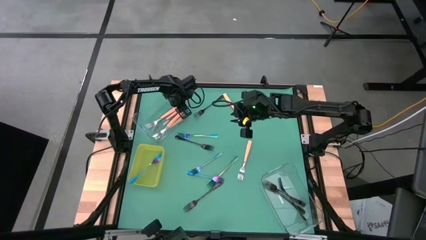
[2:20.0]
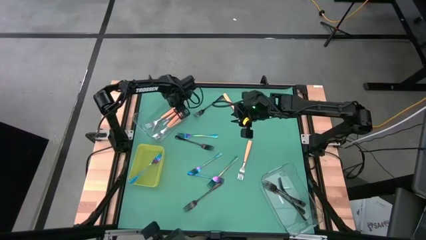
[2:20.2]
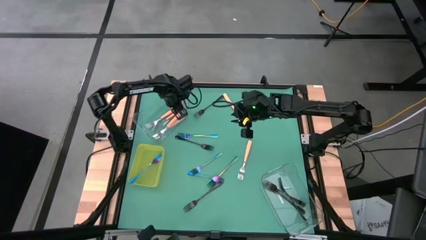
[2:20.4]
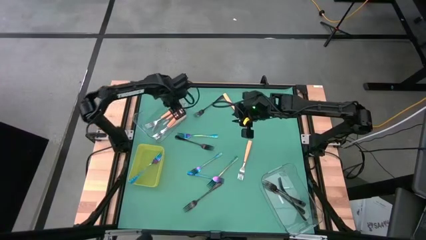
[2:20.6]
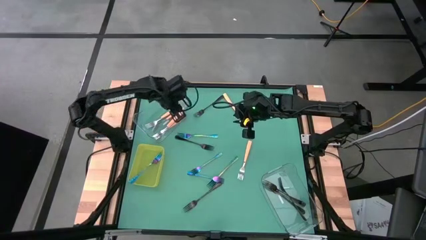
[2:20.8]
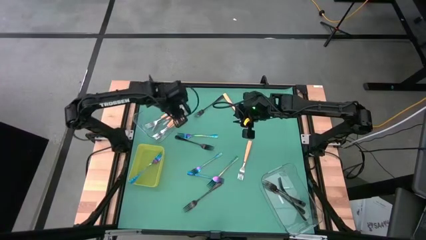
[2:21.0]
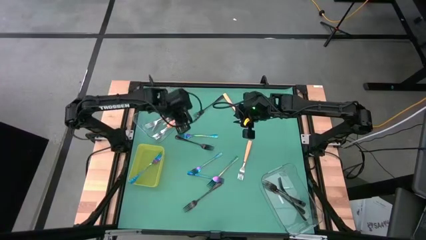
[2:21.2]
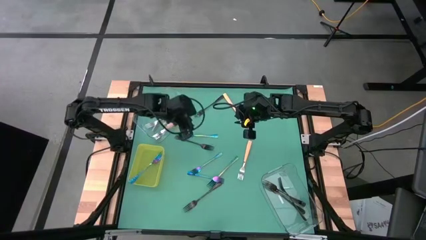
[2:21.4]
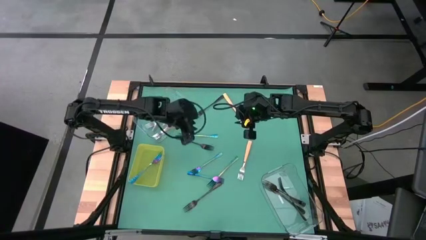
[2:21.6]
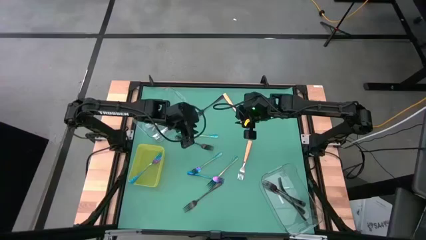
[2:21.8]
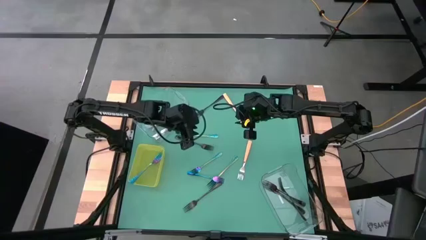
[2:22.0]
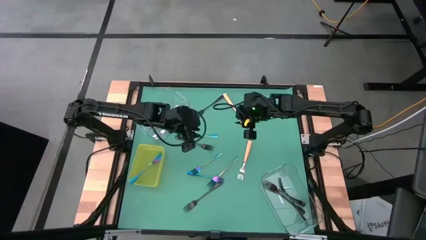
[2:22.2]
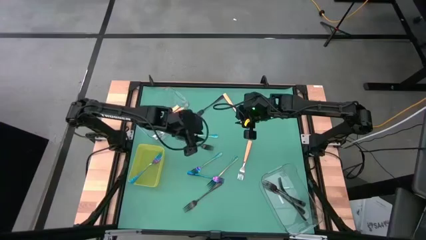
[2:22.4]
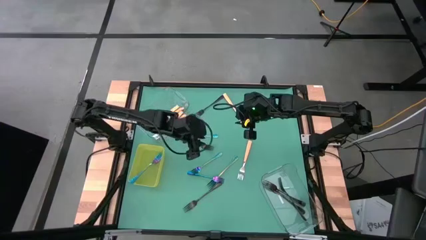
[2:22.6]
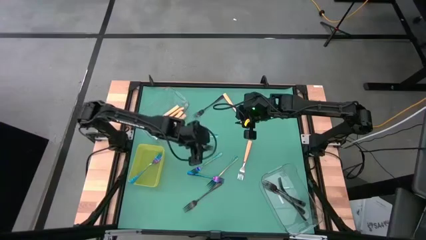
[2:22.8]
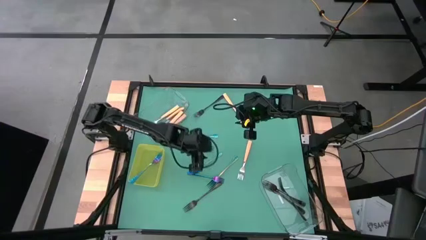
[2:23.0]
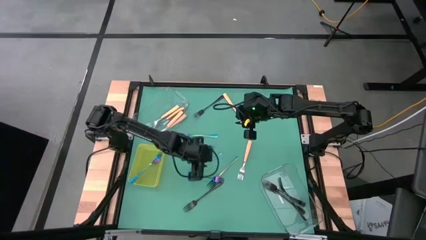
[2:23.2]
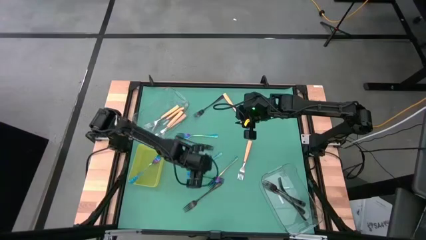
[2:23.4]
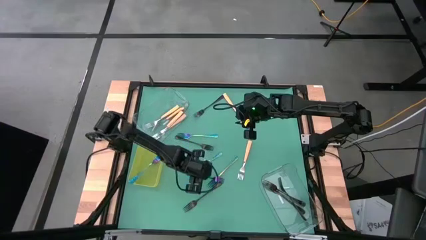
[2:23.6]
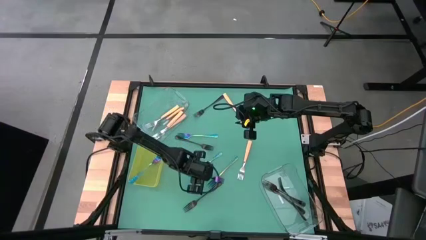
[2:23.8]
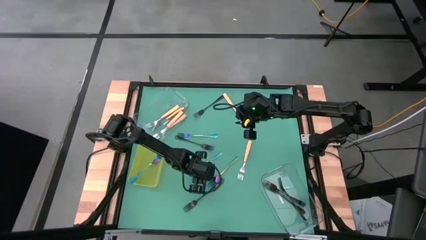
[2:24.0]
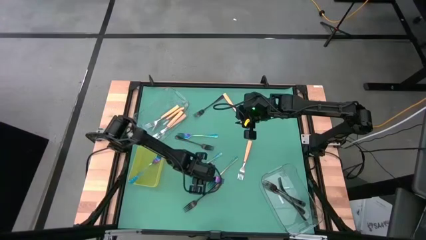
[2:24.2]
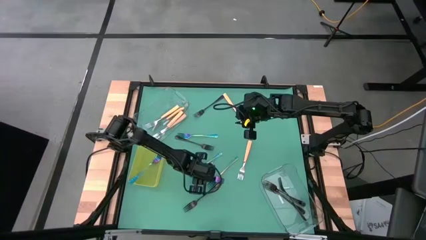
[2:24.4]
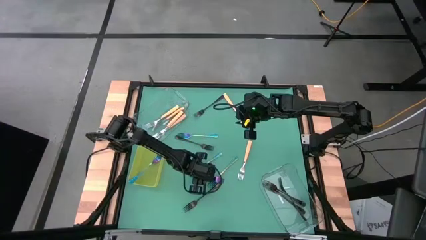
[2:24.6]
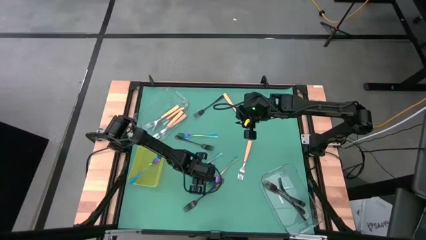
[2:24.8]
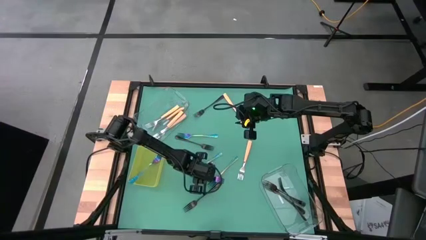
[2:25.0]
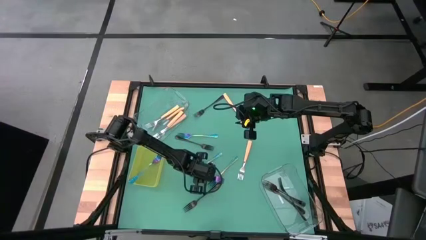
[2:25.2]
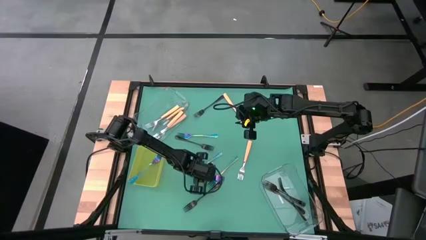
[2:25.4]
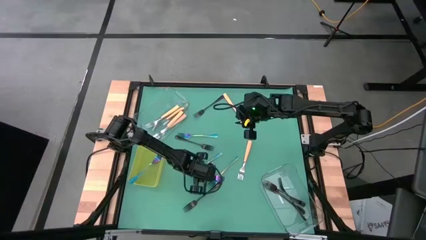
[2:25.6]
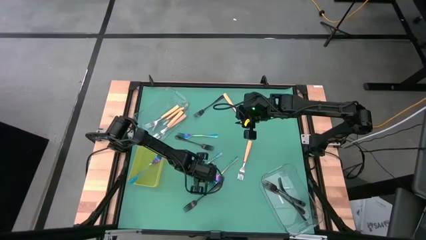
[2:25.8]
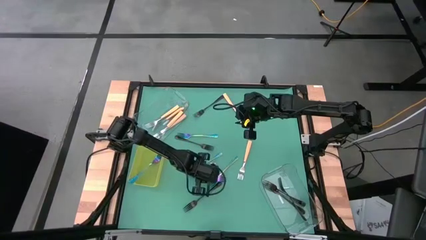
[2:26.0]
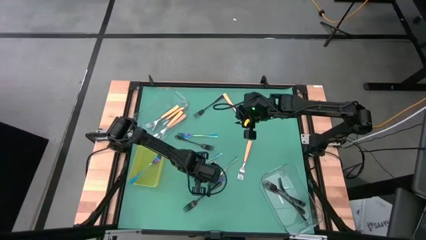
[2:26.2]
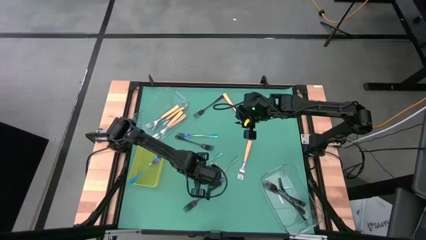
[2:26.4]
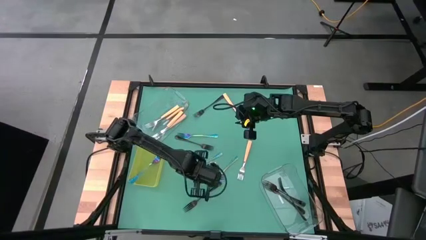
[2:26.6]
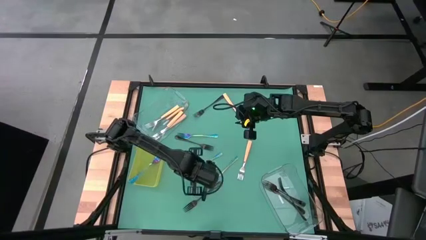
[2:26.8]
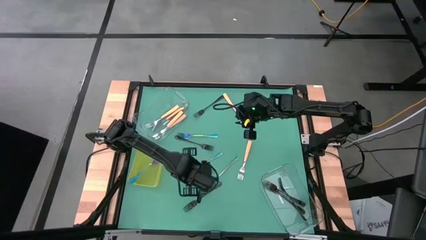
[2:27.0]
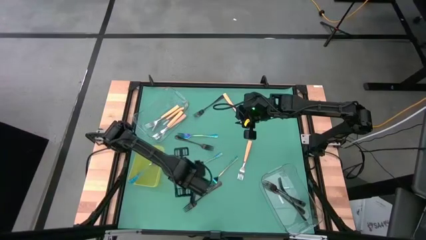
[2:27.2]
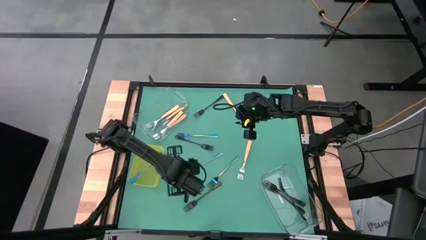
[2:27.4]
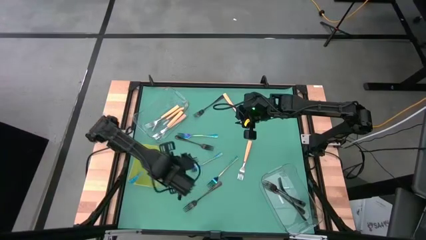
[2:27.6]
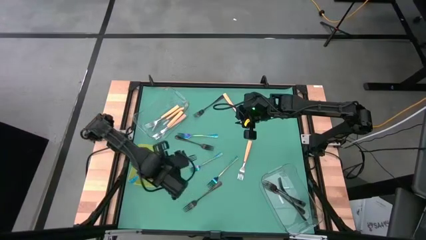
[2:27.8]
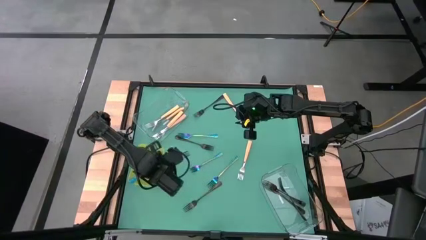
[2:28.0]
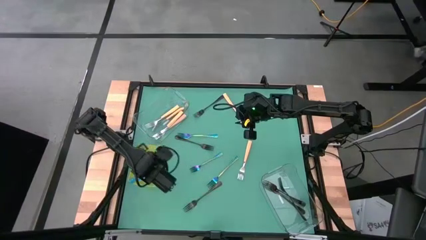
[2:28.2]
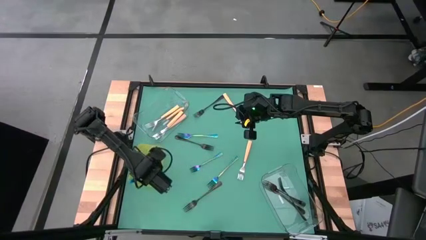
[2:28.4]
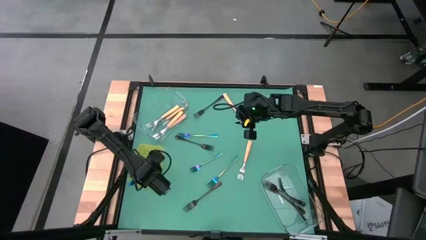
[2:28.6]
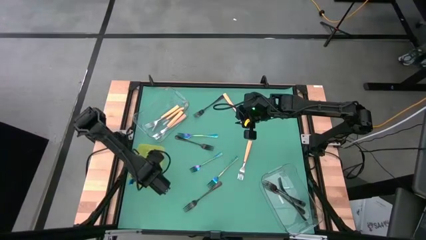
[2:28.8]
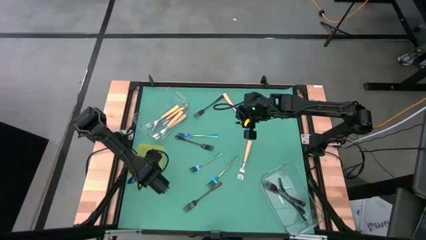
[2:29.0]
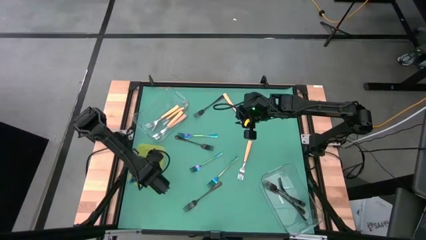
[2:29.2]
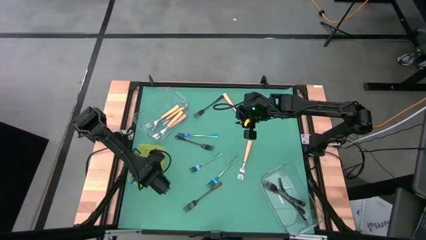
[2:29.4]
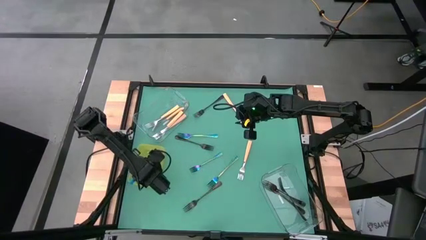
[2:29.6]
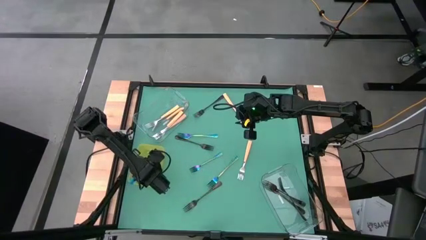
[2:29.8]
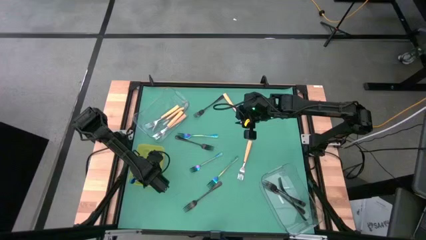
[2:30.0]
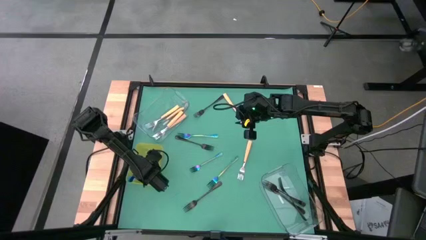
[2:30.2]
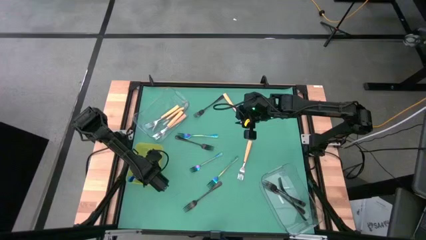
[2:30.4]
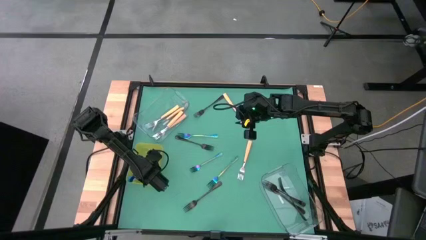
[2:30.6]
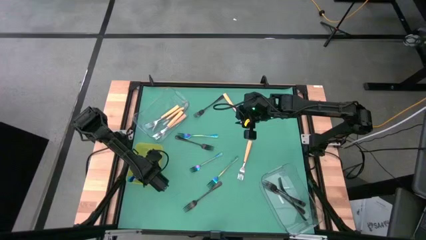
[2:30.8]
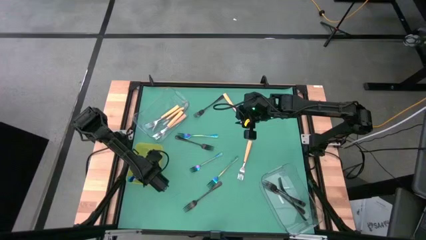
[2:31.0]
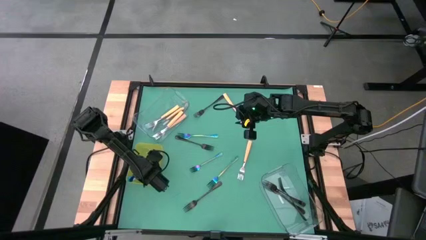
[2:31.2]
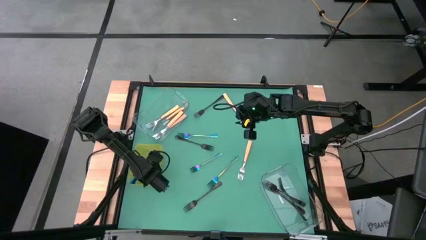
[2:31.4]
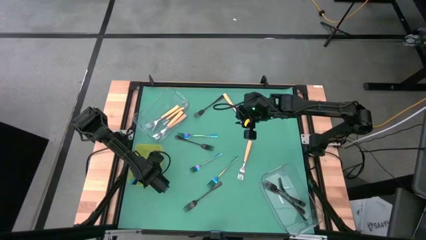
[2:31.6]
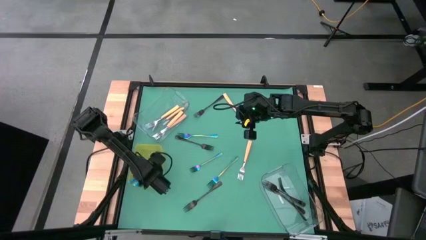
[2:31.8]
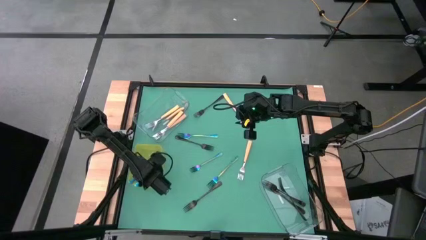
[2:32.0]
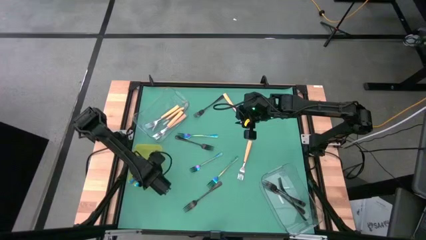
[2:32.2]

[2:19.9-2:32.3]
Task: Sort silverware by color (type)
Put the blue fork in the yellow bin
